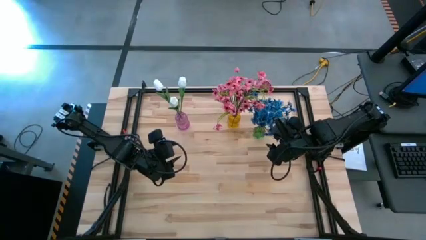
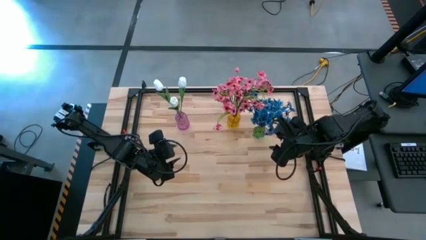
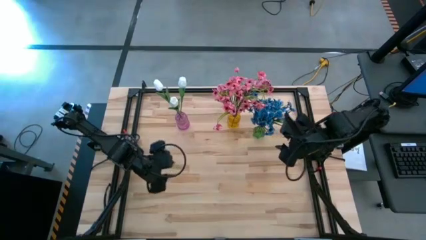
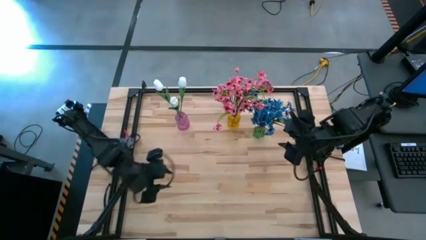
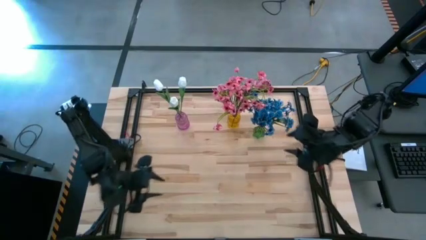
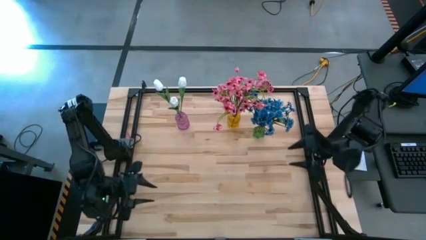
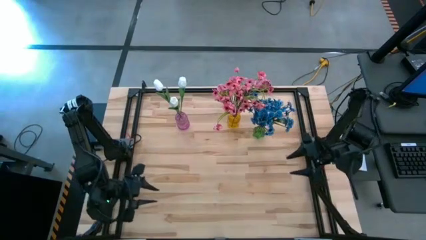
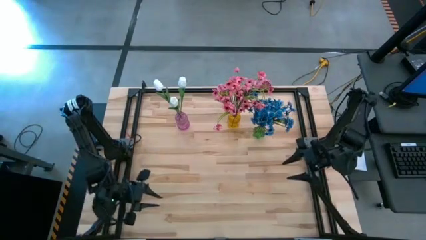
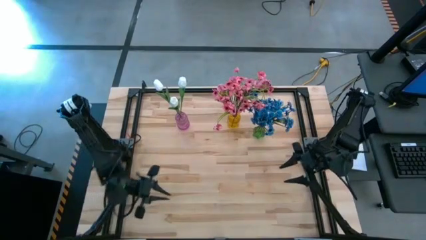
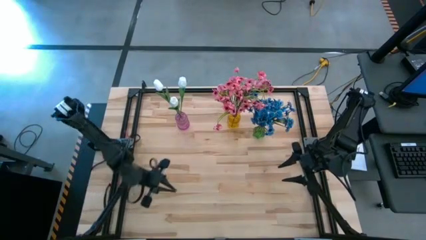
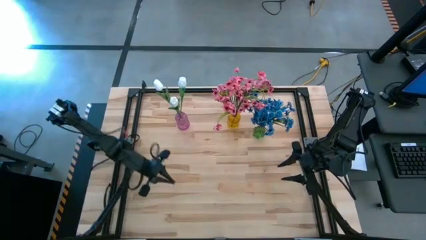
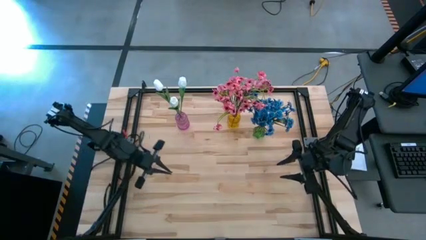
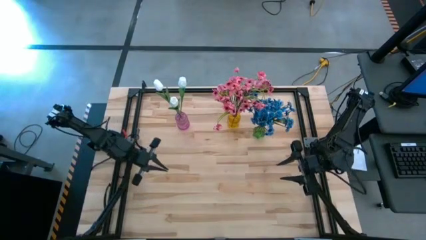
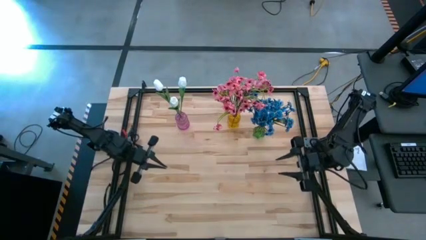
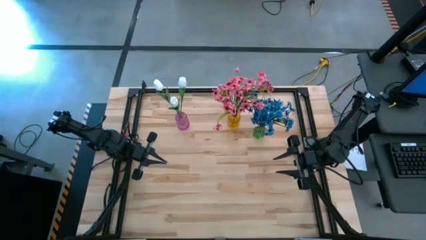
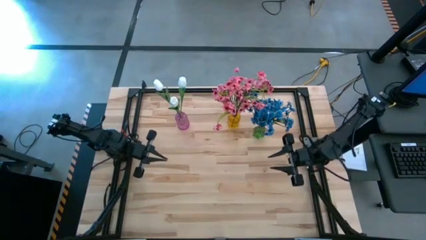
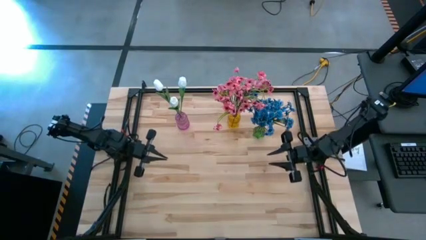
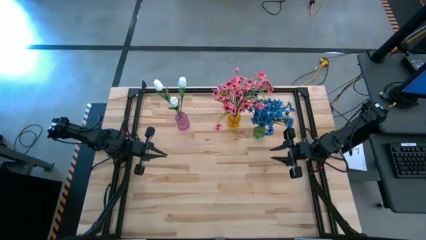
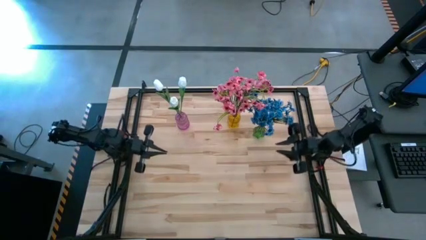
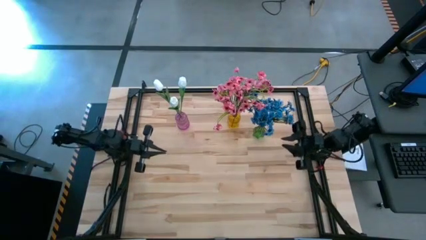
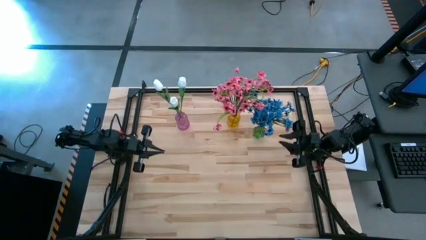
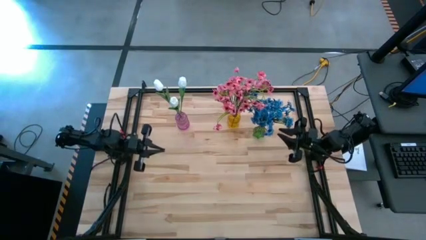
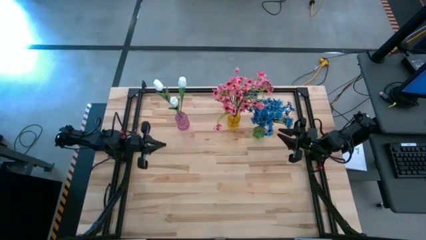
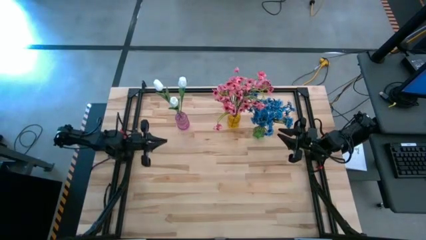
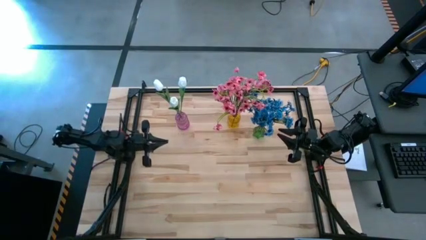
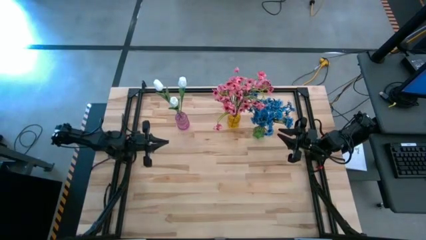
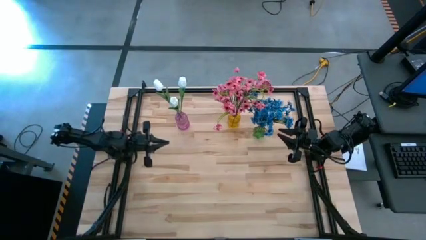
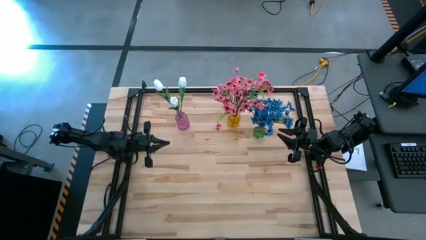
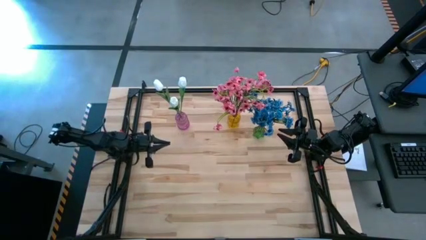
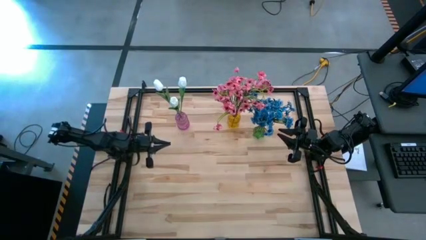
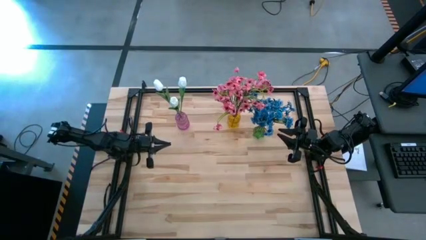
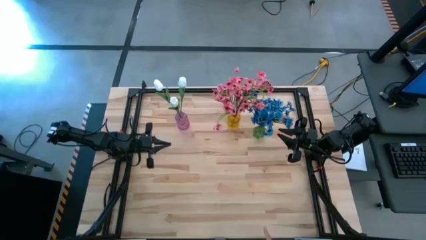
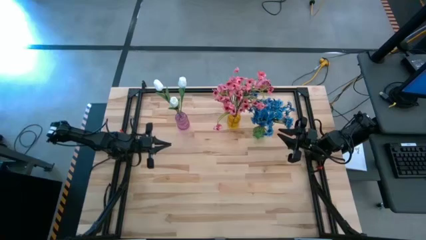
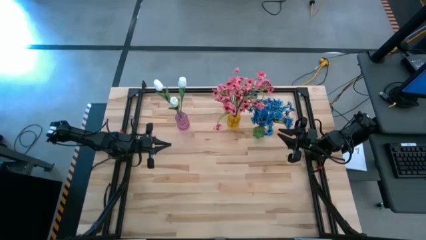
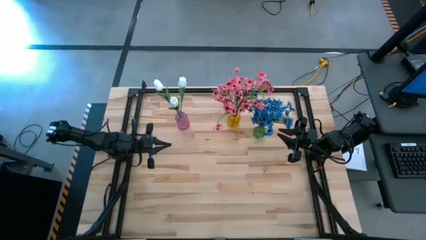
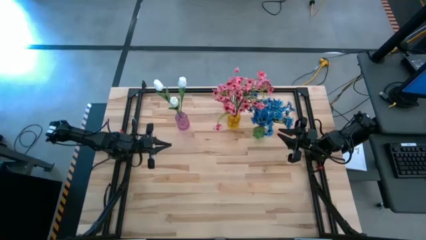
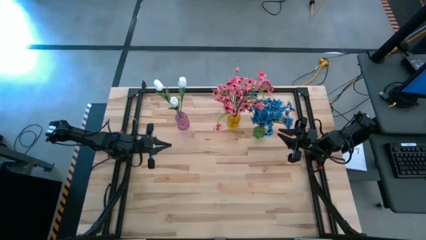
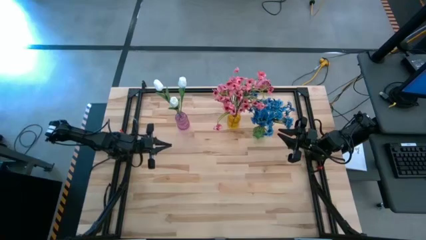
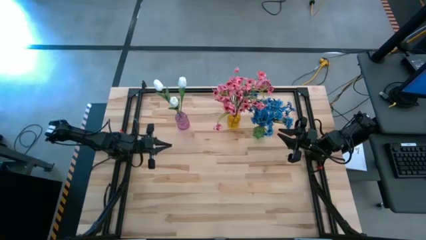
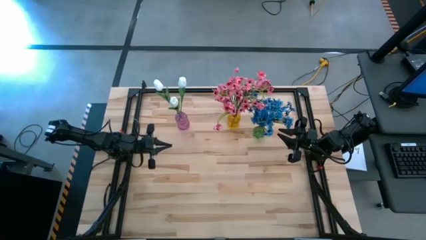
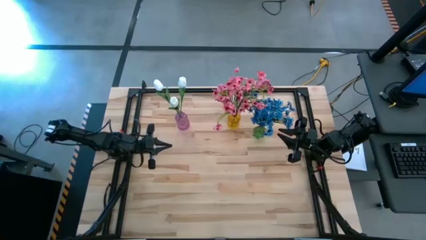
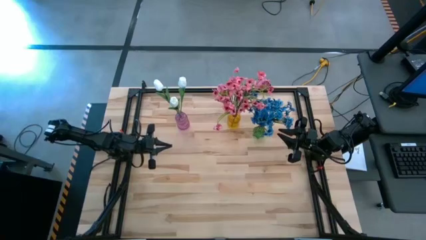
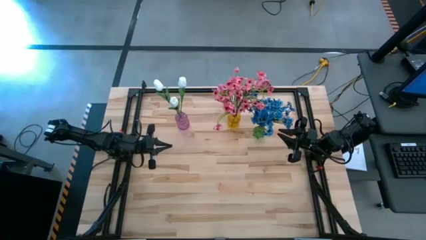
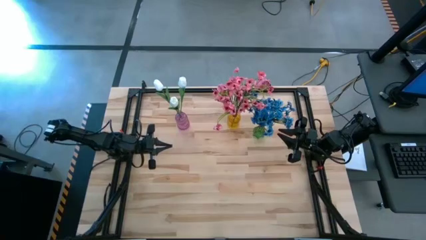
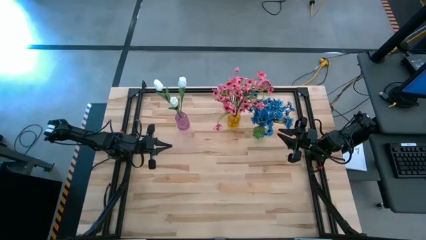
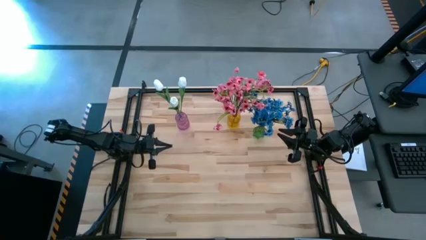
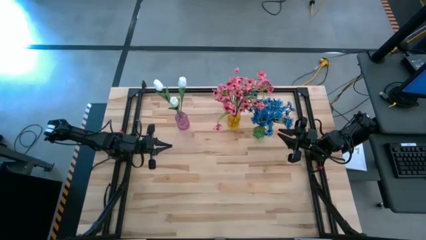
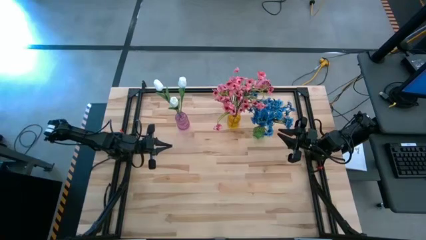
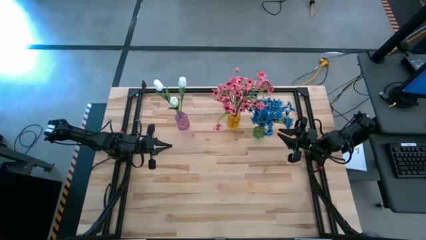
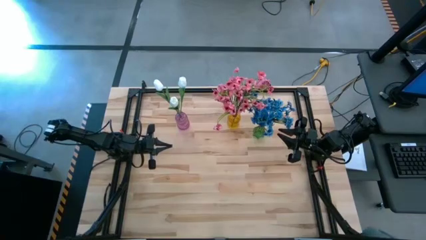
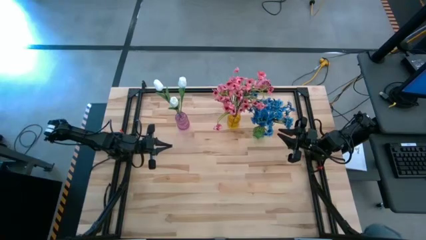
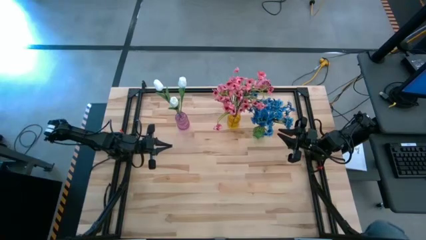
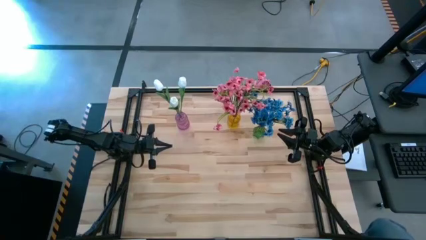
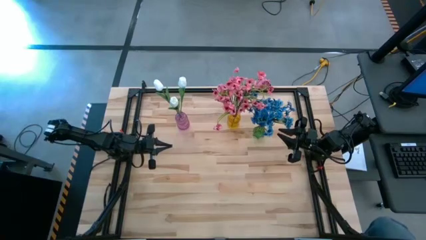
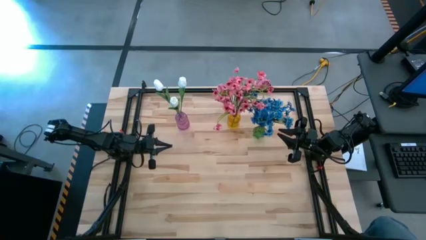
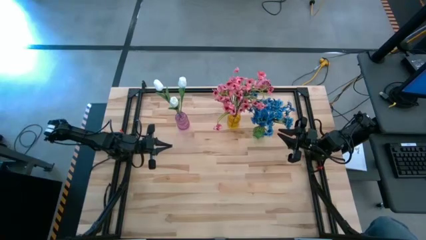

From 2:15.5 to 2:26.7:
Task: Sort flowers into vase by color
Return to Home Position

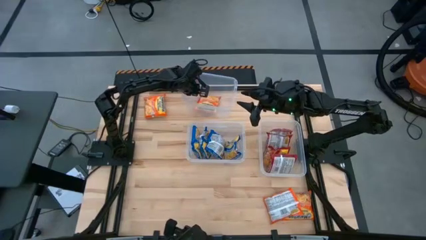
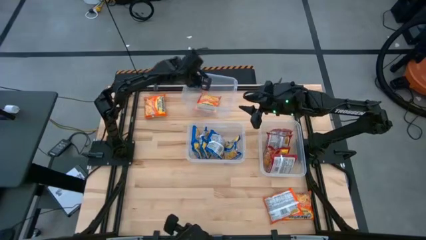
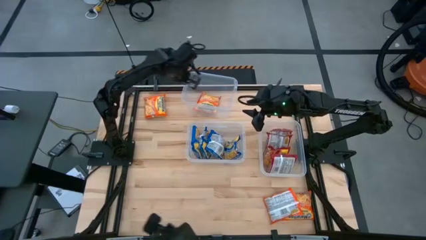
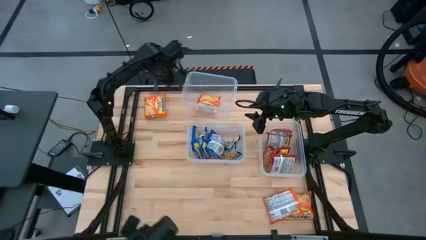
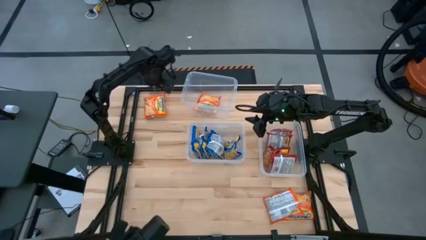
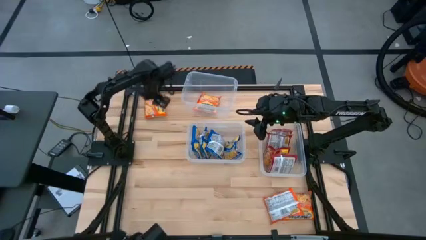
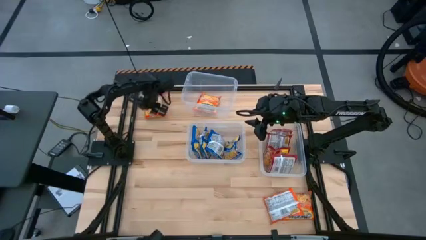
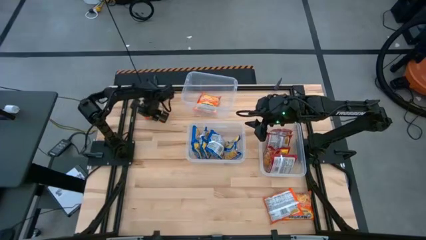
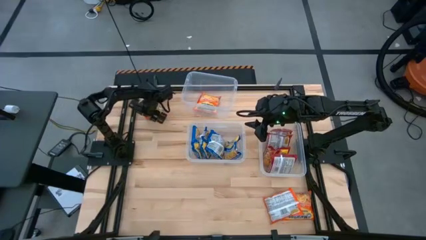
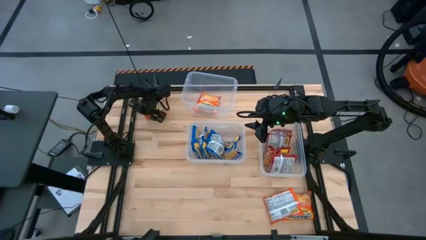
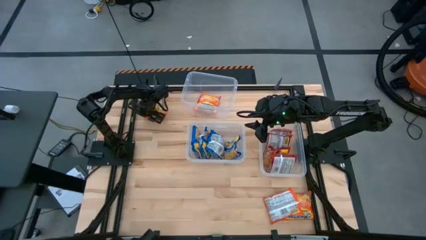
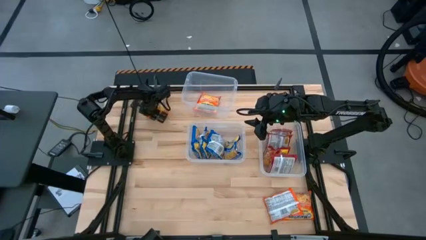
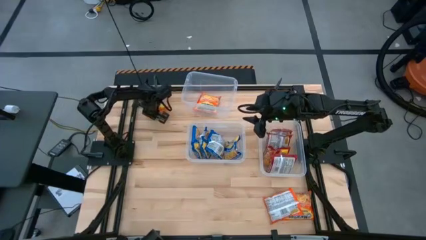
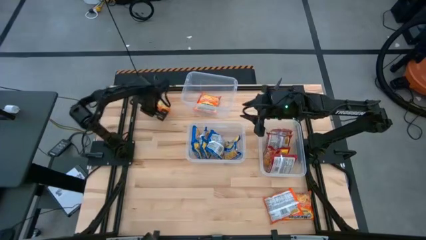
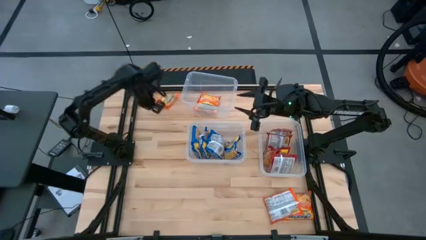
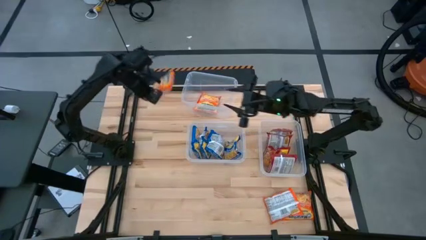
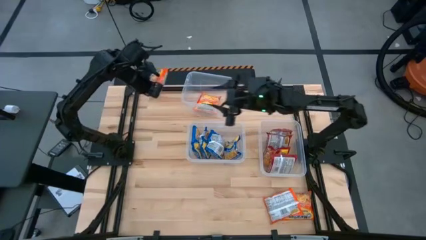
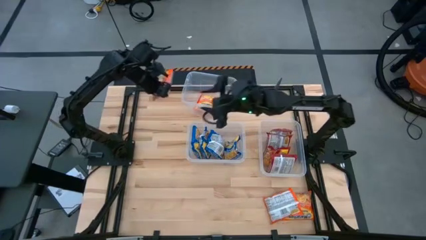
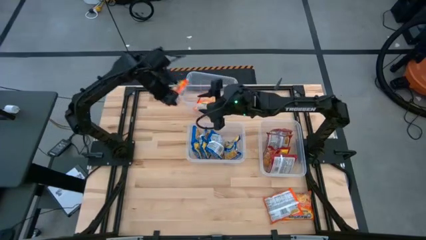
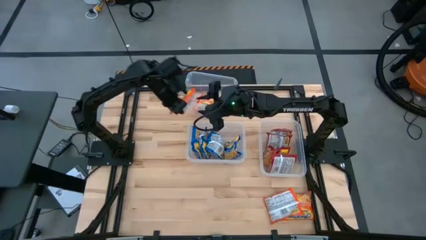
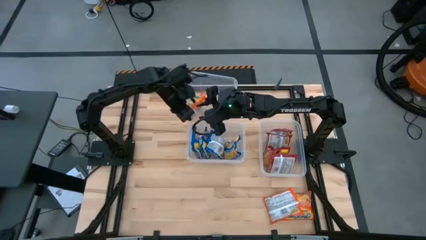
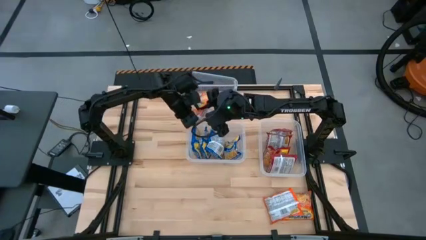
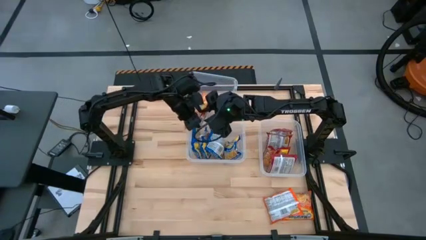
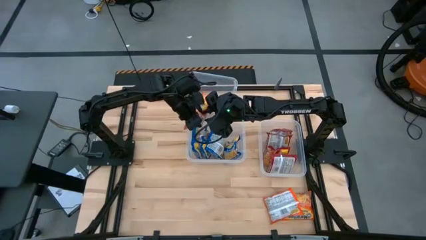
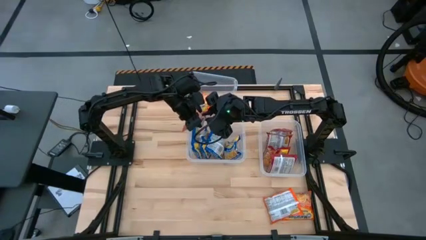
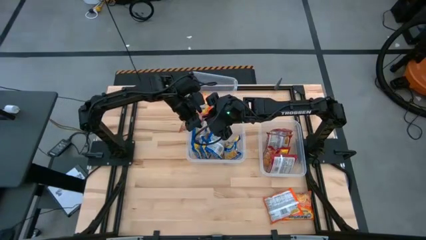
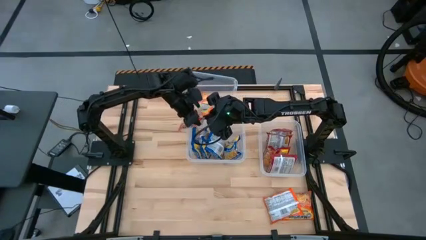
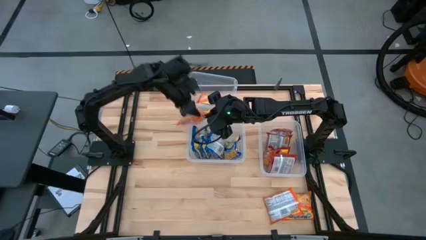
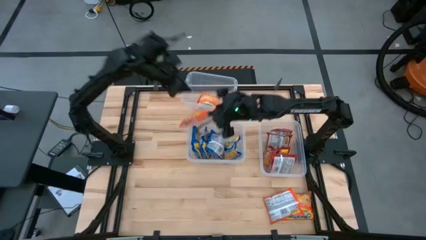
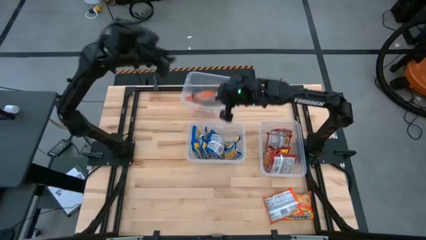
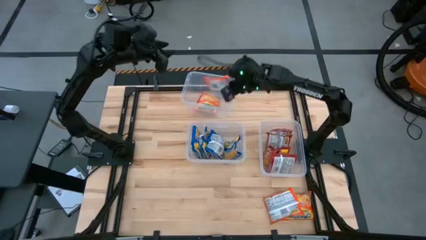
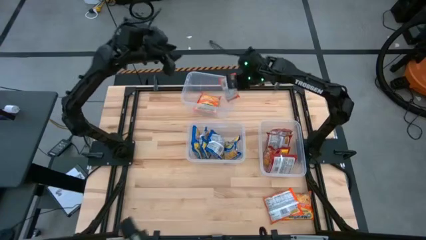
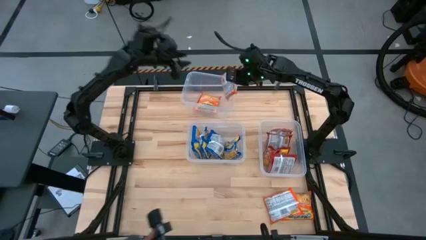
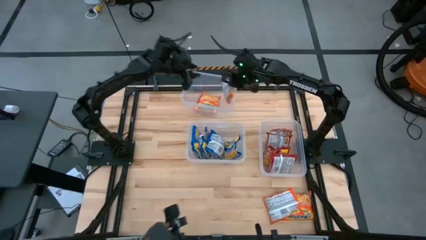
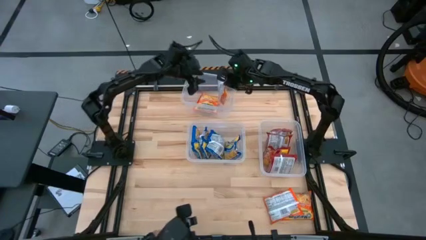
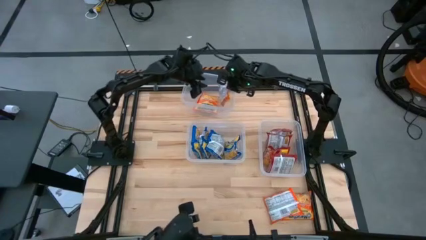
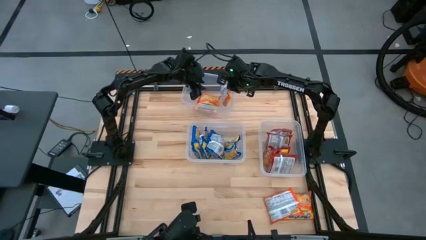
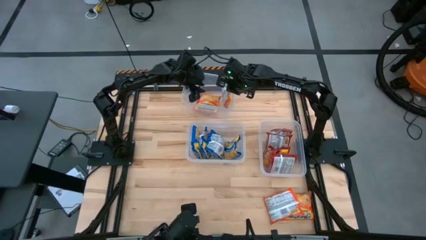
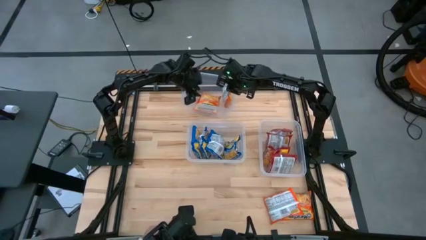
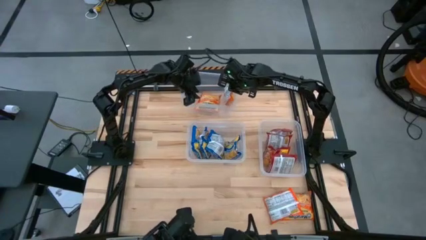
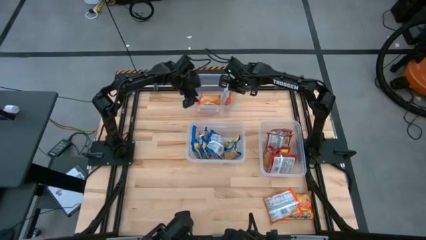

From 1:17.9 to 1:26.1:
Task: Sort Maruchan noodles
Put the orange noodle pack into the top transparent bin
